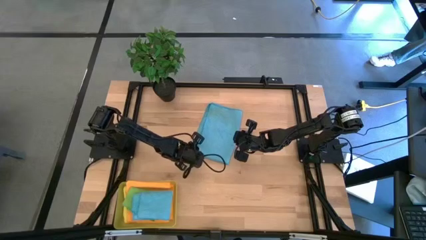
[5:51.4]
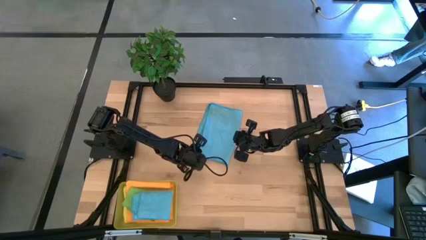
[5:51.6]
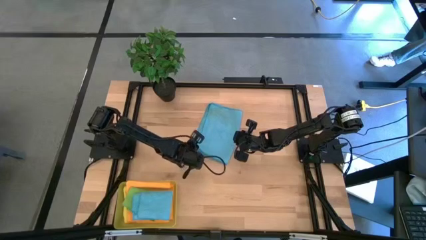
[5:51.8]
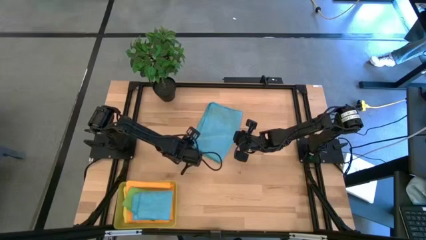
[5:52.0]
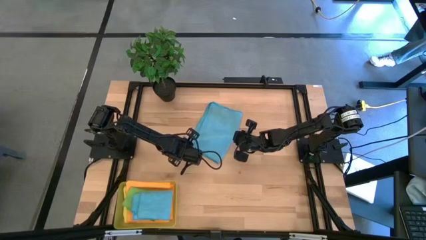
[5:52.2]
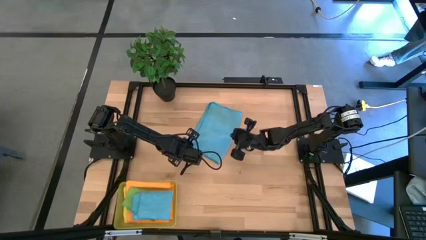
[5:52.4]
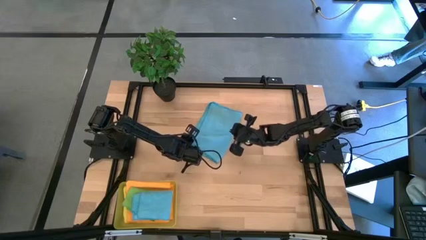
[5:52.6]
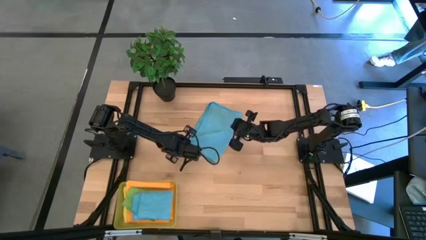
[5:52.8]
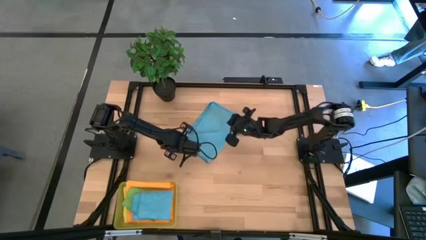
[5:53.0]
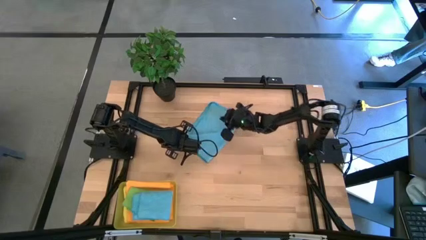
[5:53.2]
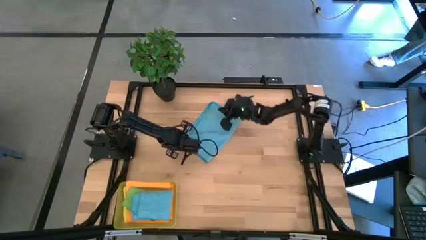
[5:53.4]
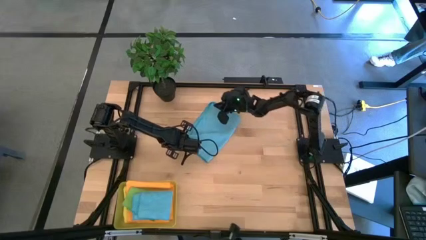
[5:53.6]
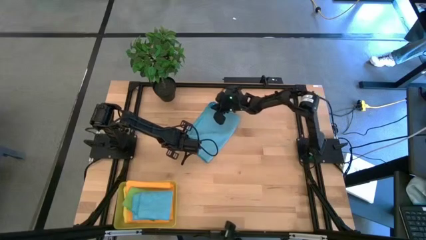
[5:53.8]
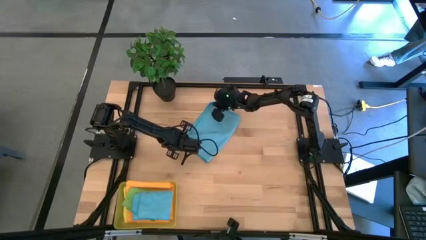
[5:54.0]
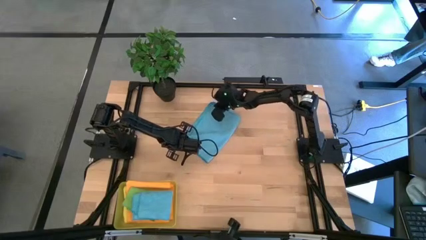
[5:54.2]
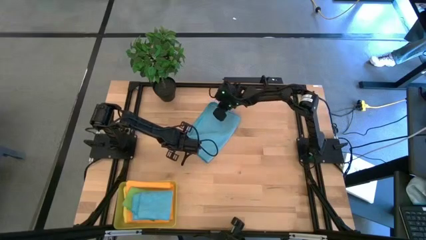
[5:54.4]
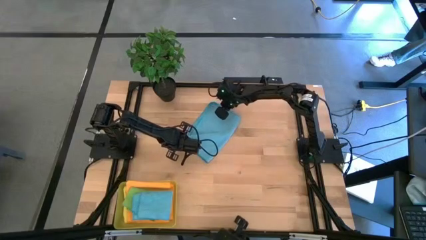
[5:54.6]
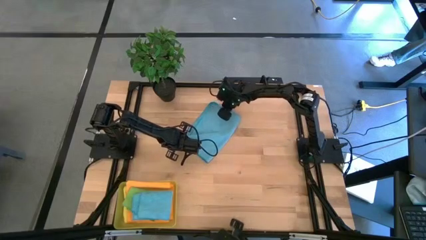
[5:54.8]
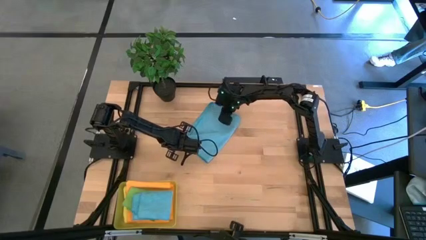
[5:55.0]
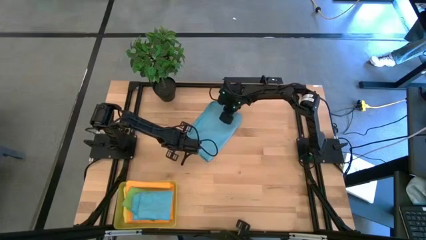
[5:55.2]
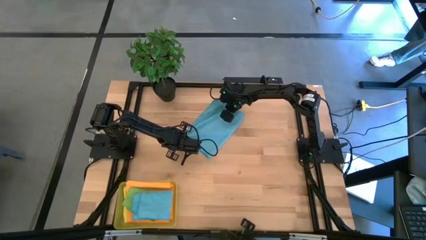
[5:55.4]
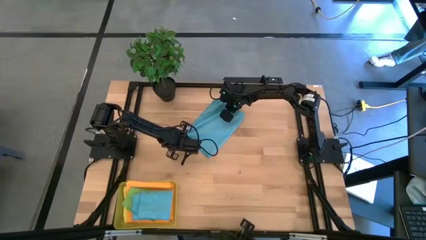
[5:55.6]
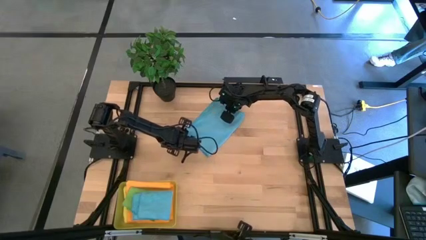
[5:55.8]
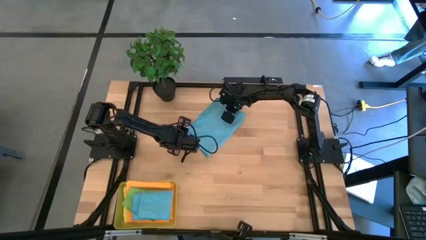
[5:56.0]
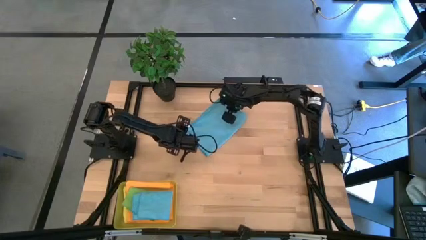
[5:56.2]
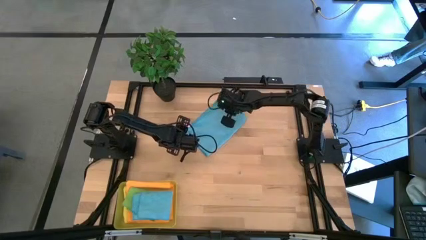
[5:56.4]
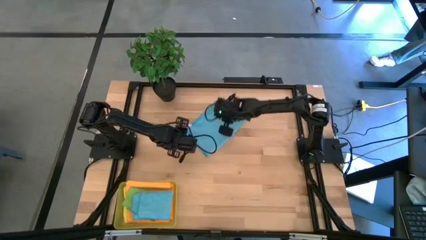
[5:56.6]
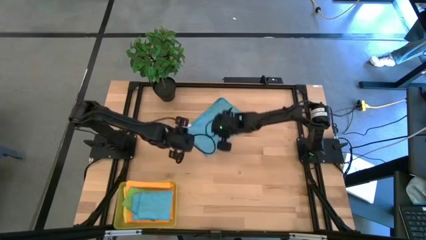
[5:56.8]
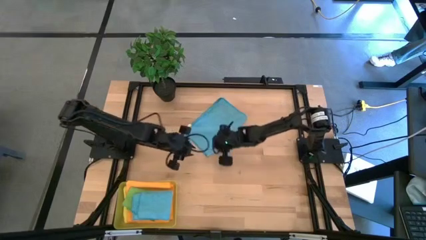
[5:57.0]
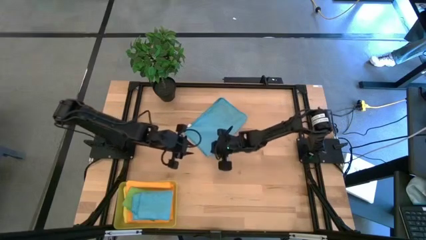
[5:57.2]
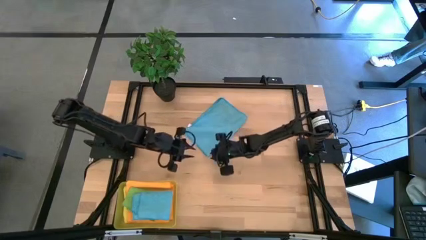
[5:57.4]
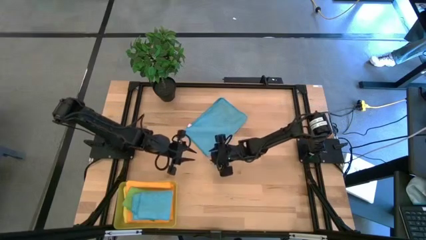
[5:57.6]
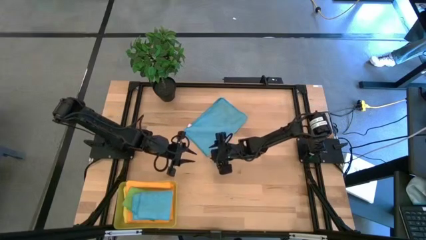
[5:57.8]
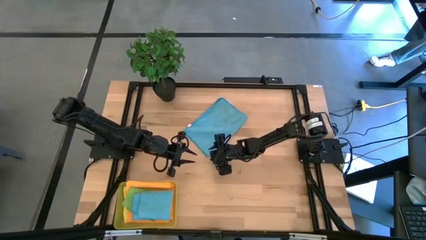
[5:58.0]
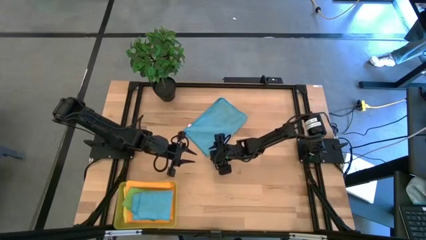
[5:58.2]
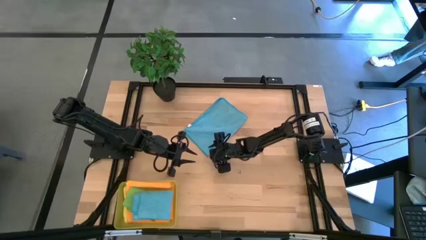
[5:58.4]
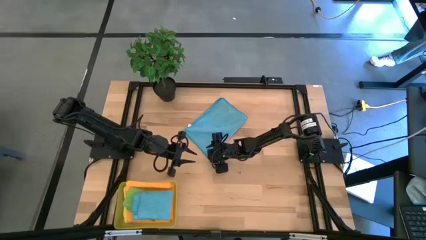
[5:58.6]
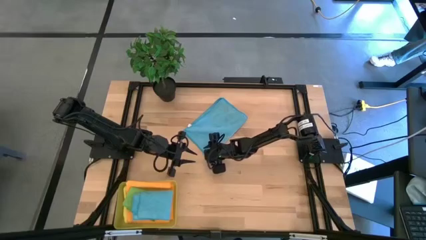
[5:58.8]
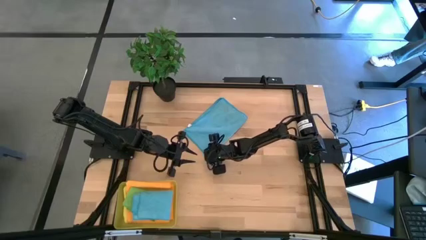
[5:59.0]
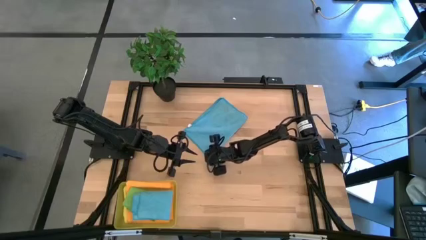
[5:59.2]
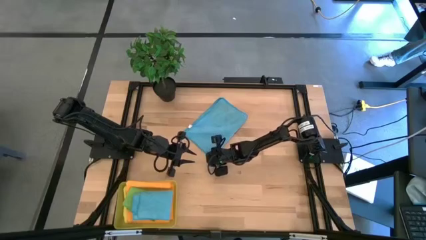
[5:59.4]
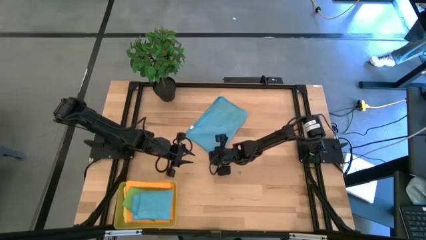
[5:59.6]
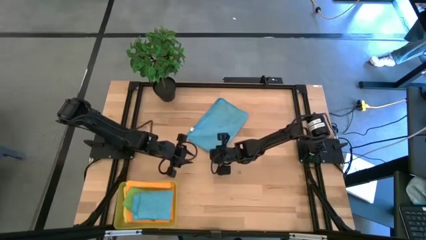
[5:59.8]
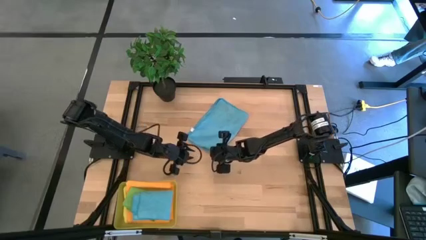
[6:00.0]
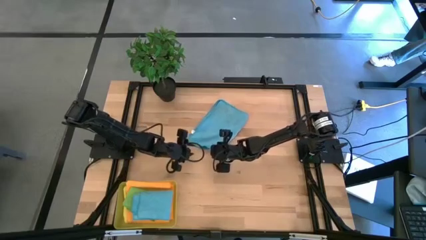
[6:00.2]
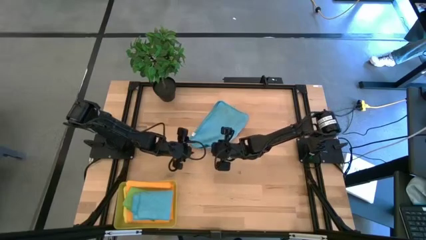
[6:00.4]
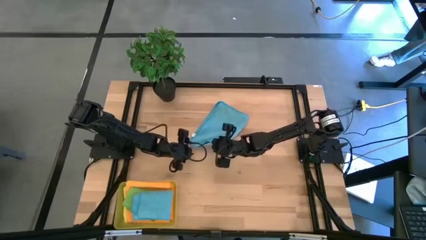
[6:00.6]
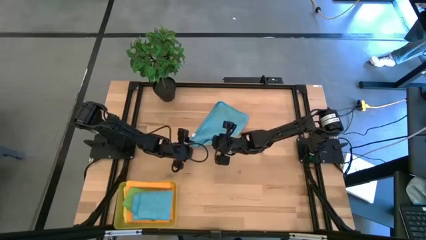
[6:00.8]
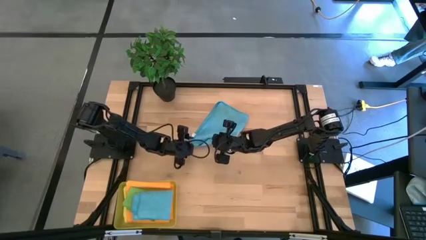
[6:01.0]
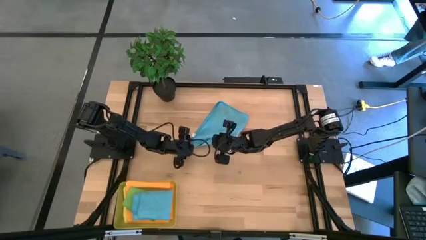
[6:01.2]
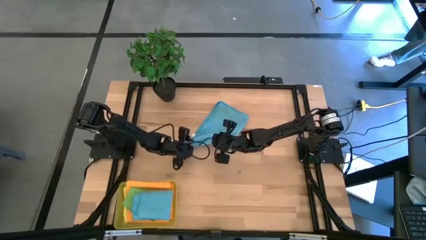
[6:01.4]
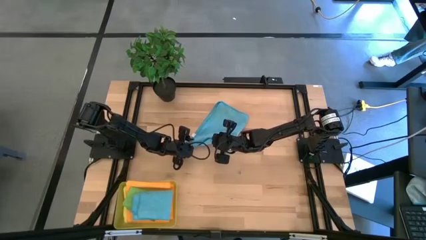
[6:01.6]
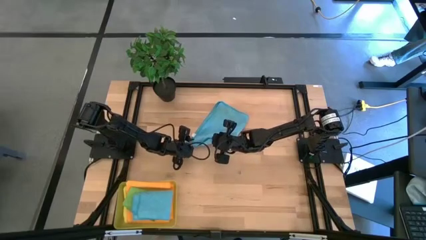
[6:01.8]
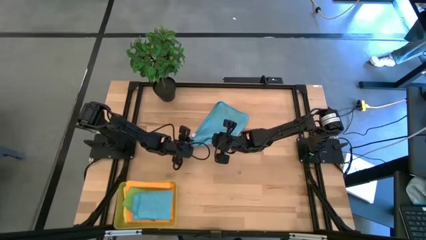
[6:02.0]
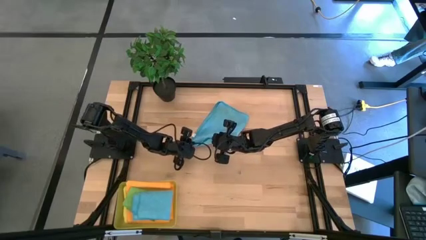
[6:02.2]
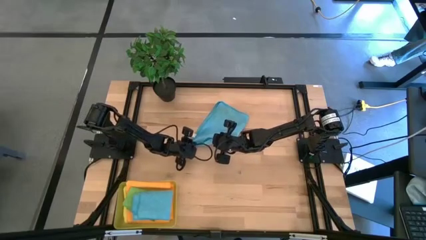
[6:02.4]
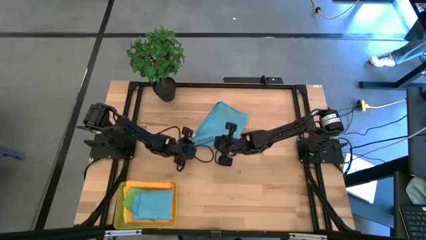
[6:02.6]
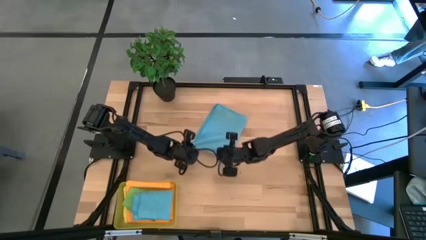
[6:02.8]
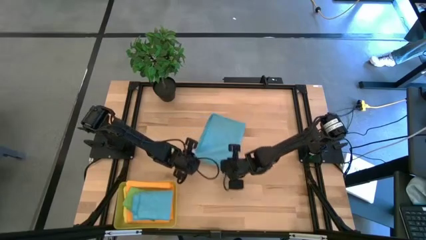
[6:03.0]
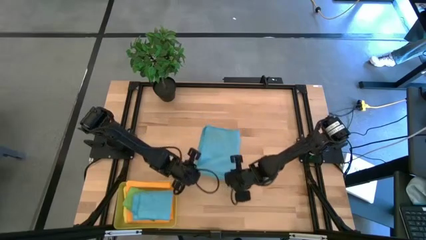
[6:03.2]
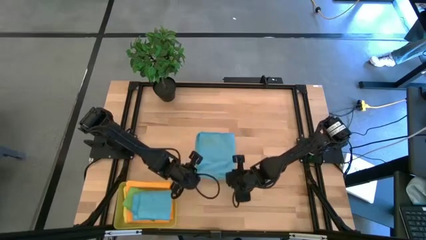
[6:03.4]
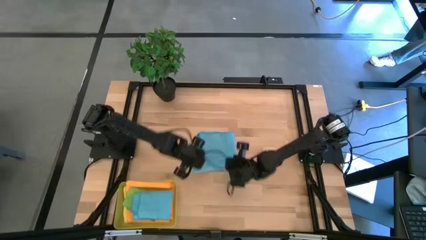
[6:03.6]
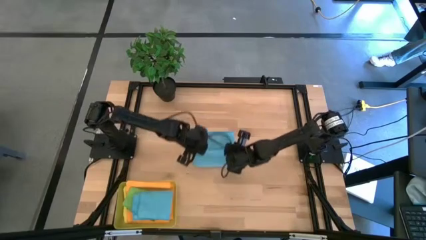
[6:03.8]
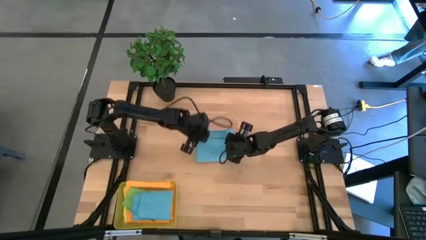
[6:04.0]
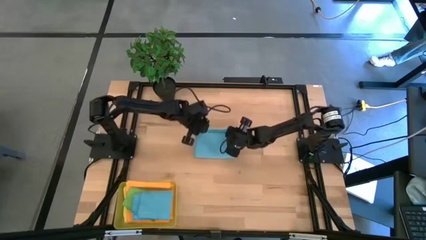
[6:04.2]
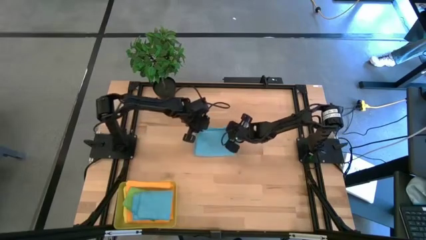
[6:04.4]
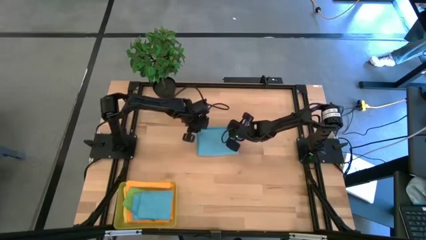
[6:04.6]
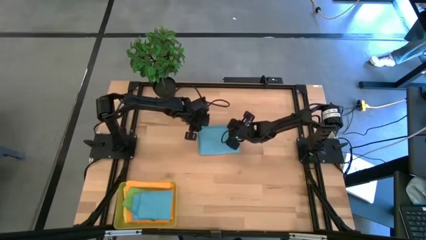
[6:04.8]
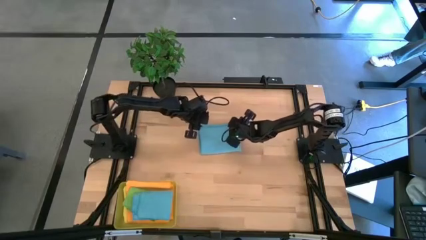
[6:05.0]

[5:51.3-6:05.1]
Task: Fold microfiber towels
Fold the blue microfiber cloth
